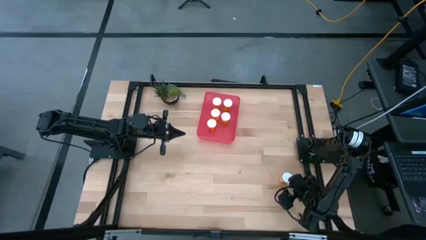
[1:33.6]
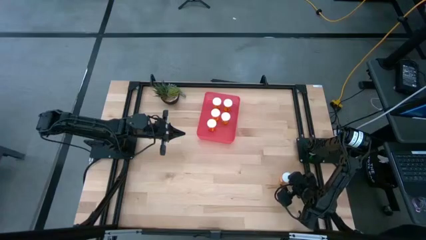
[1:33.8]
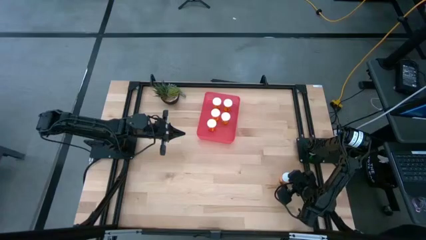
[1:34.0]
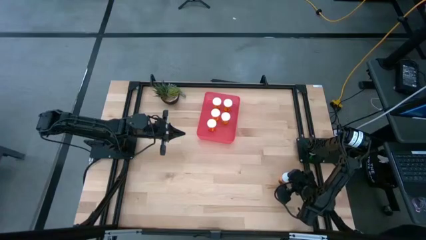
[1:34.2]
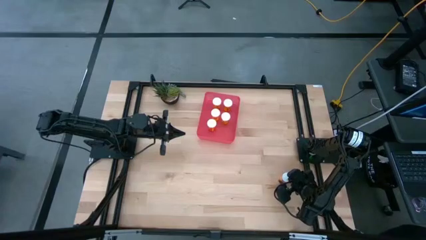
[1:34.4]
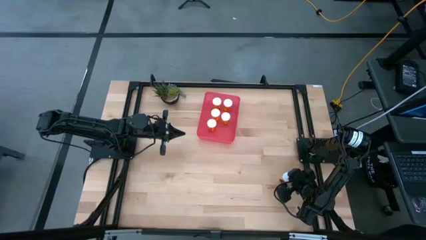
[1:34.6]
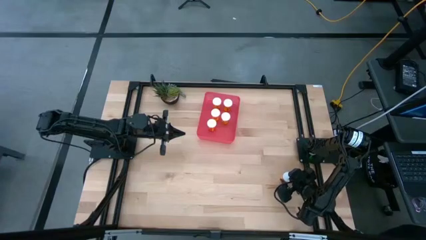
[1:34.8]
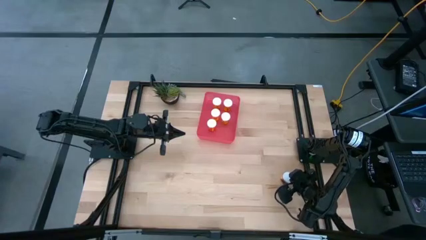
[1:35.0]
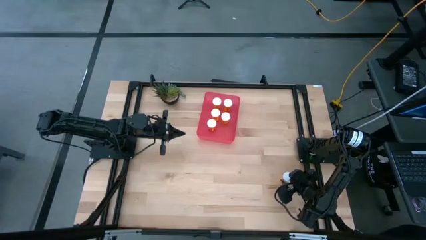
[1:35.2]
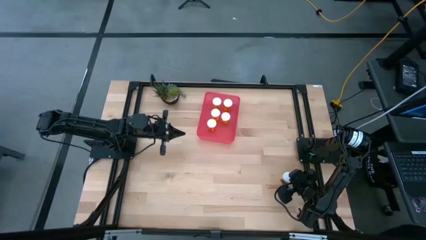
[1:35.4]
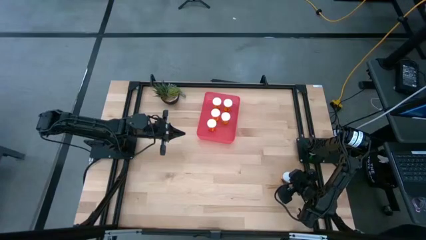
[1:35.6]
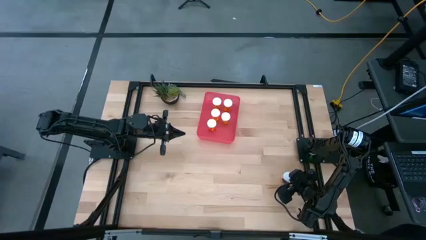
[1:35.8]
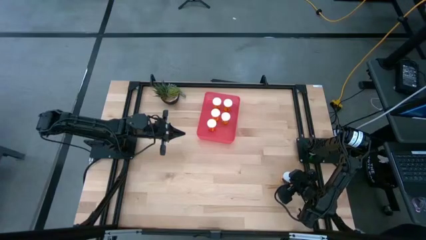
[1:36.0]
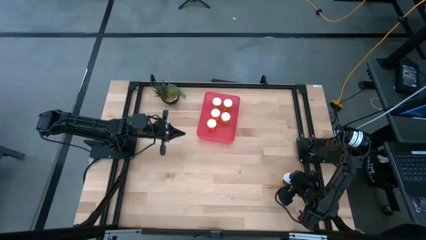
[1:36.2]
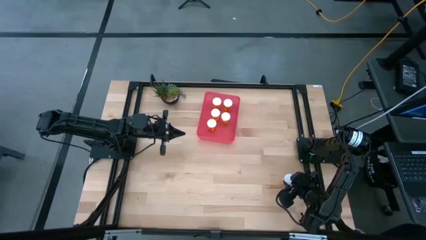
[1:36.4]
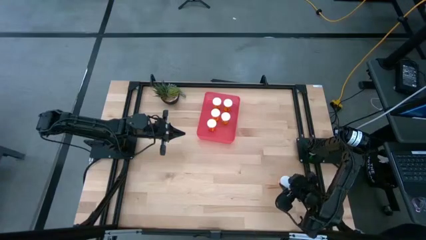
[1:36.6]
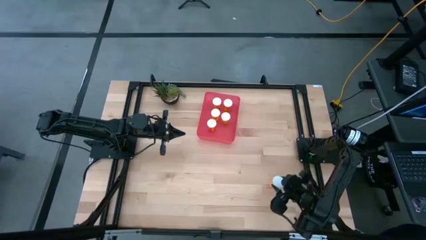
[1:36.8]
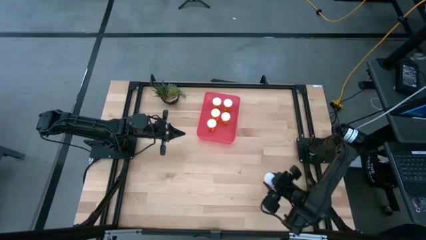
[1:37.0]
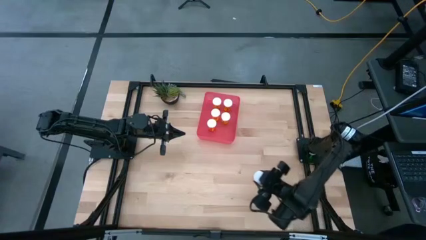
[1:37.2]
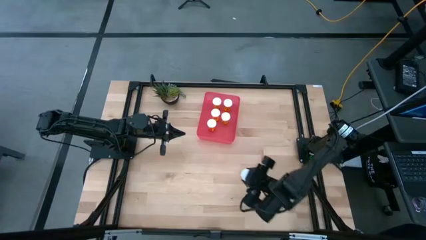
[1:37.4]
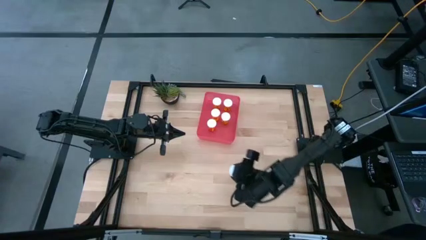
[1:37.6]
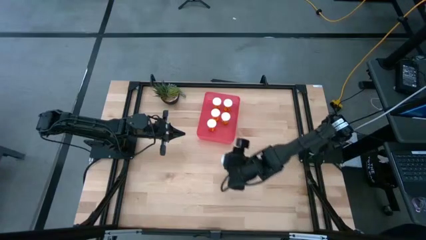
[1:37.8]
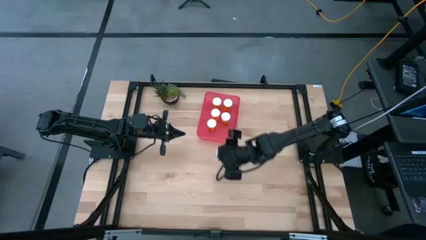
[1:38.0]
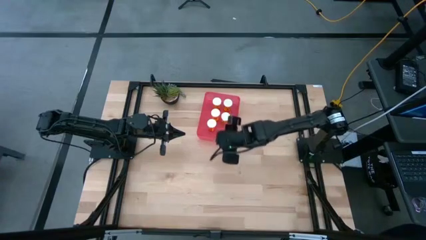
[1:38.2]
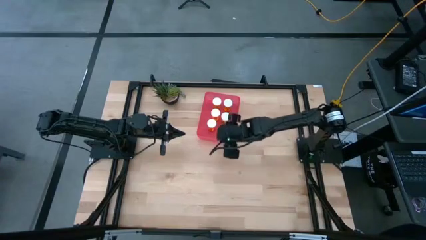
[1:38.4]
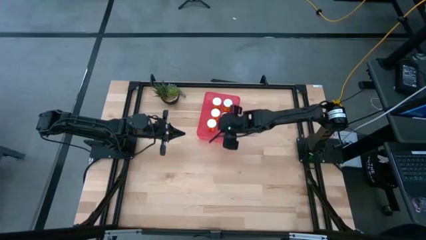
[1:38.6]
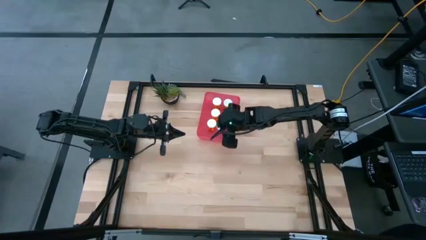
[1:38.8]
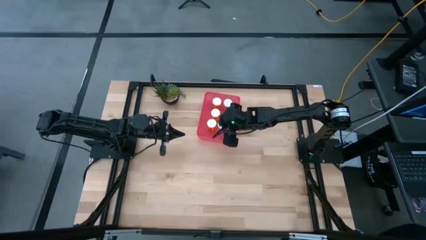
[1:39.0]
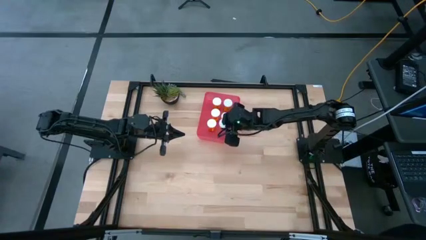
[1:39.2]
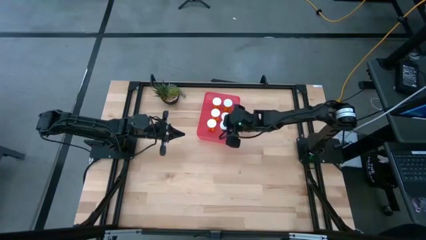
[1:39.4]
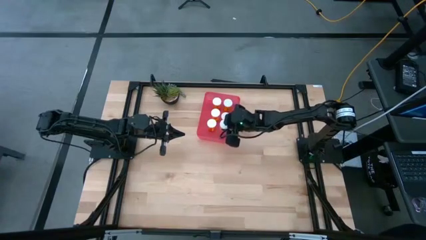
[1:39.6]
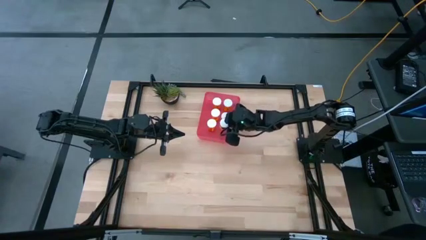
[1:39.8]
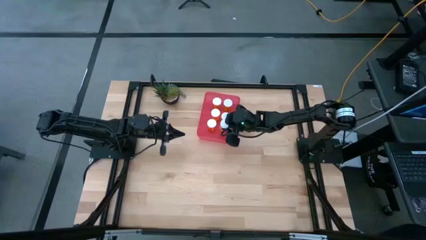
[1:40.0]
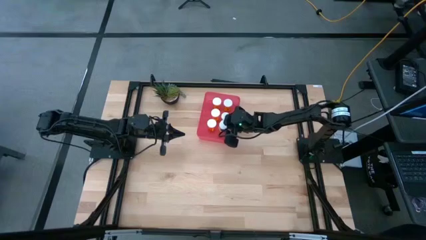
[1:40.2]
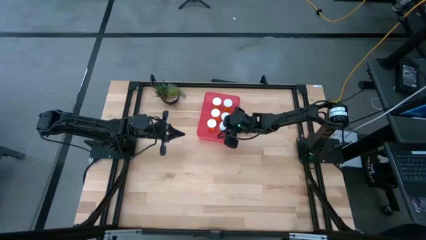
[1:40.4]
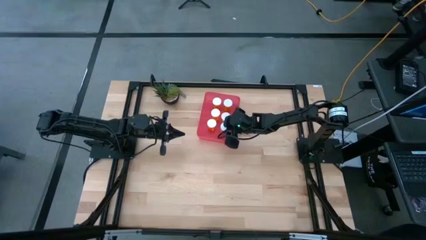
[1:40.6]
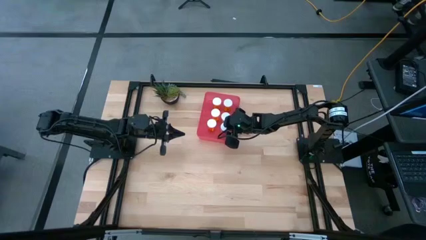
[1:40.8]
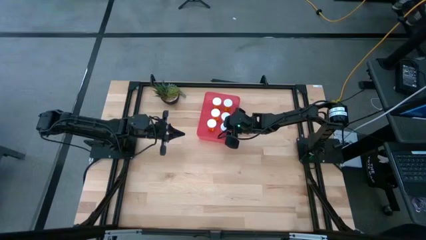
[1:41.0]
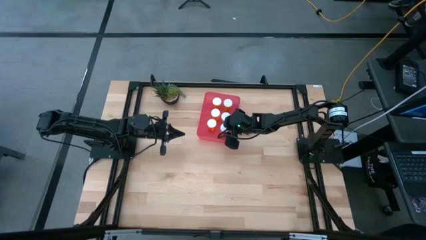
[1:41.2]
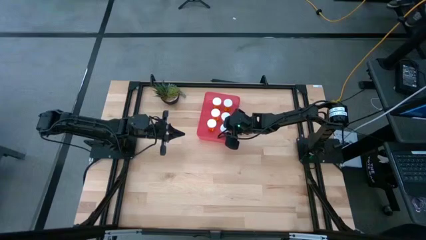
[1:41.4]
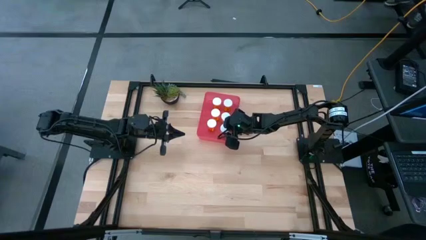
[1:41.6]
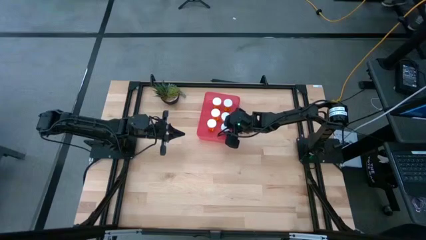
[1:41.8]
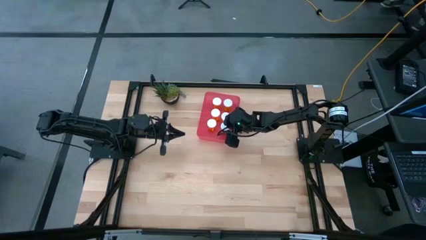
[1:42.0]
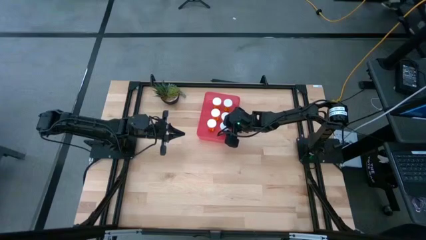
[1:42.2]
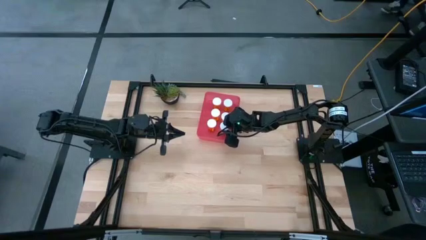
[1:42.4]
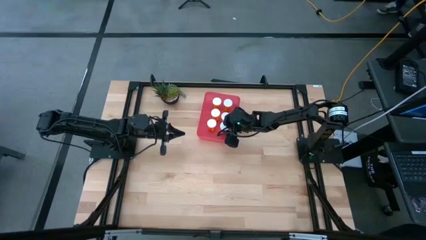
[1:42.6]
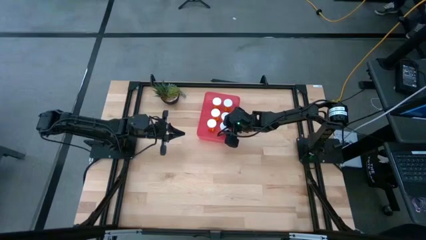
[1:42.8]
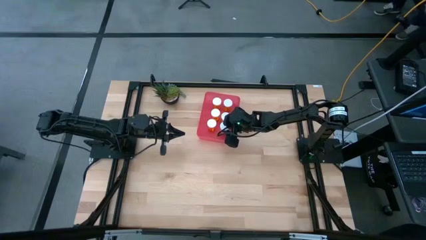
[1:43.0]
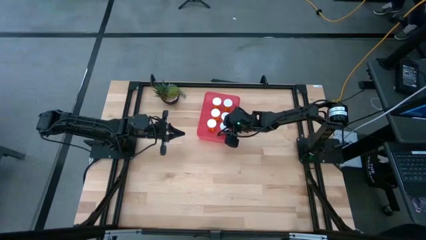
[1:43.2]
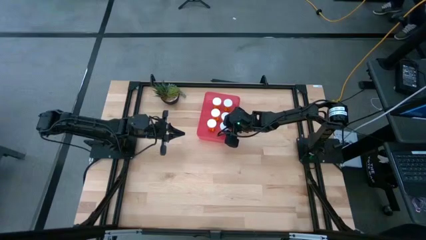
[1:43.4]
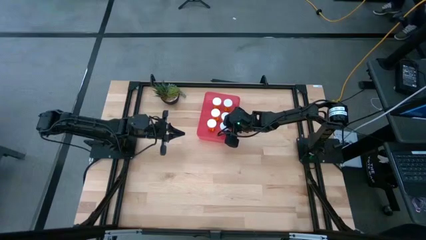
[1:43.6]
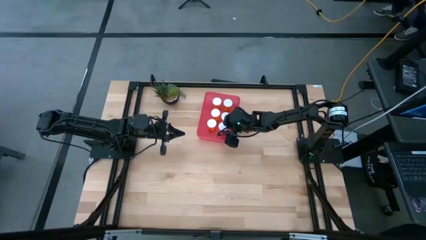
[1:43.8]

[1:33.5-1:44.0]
Task: Pick and place pill bottles into a basket
Put the orange pill bottle into the red bin

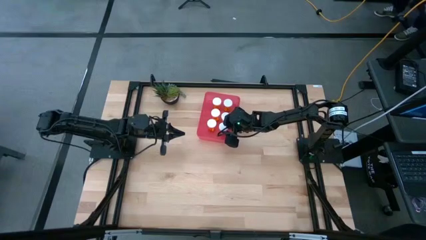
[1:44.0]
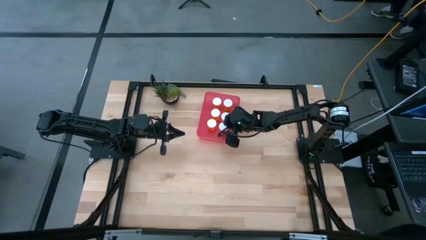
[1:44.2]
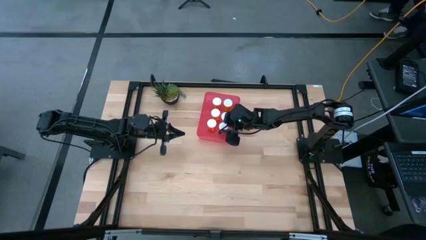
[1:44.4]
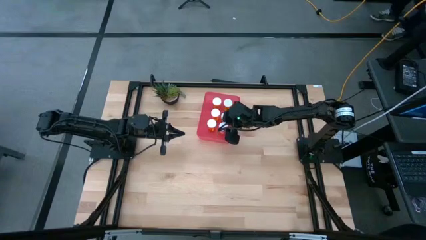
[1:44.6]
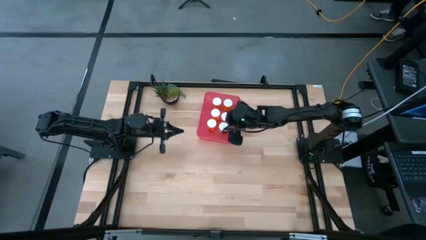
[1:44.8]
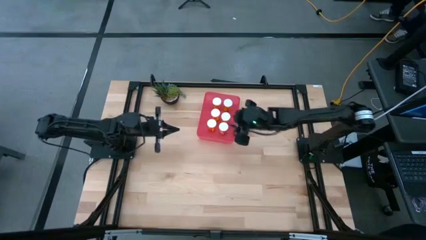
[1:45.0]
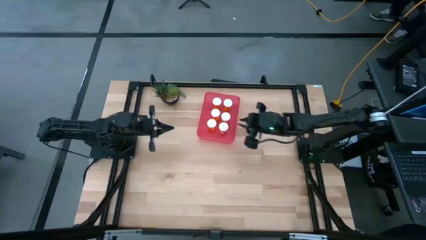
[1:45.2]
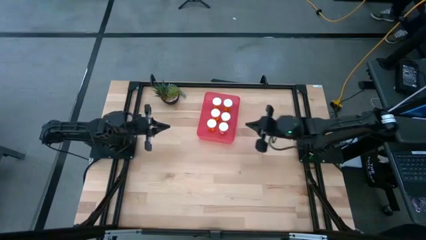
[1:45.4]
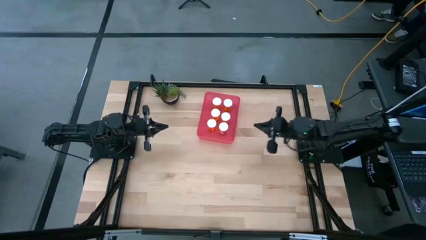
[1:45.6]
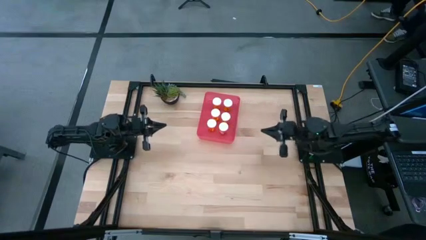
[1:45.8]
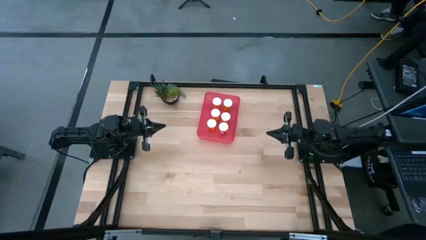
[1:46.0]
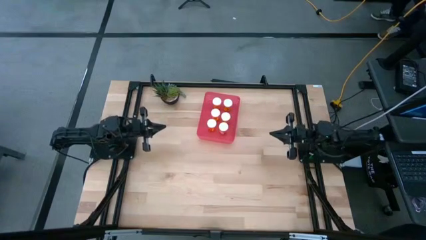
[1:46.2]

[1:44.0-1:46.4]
Return to Home Position

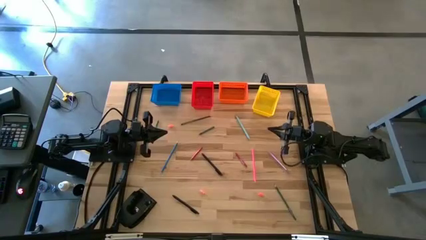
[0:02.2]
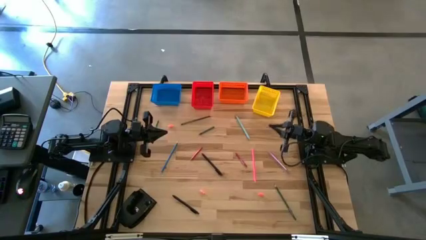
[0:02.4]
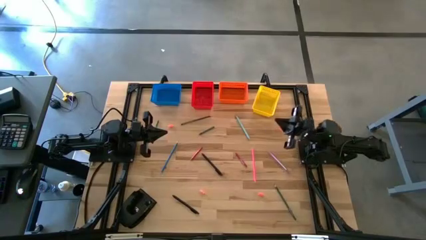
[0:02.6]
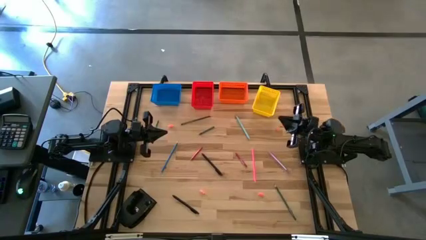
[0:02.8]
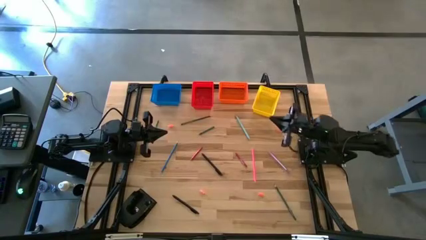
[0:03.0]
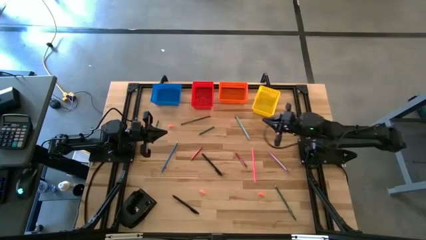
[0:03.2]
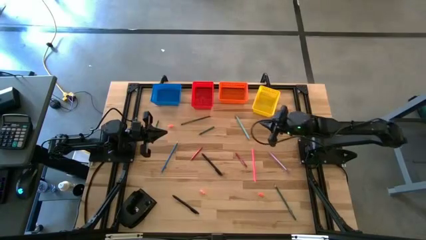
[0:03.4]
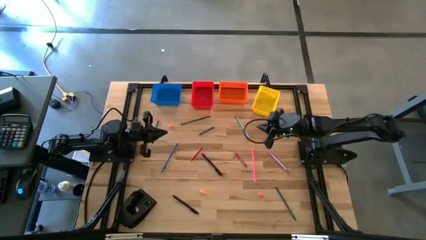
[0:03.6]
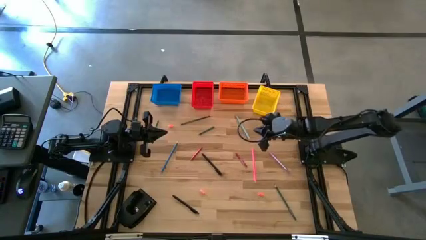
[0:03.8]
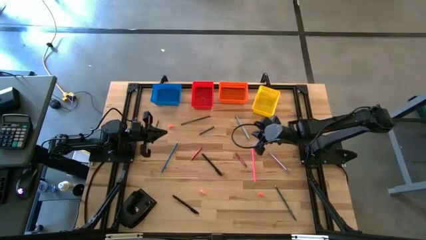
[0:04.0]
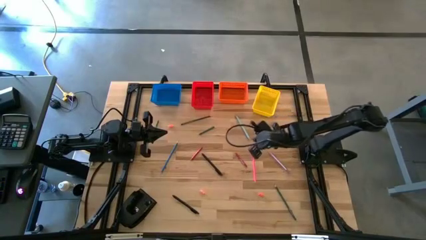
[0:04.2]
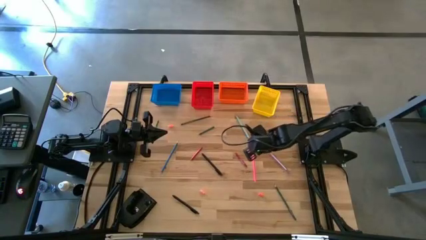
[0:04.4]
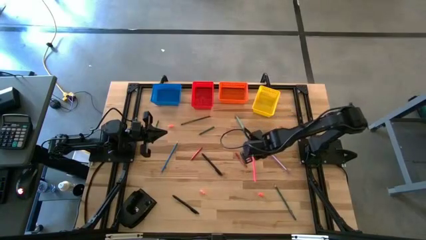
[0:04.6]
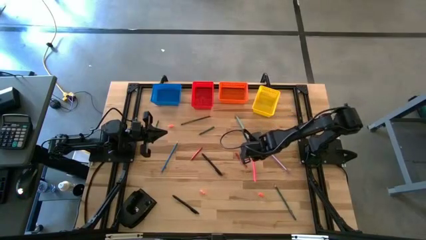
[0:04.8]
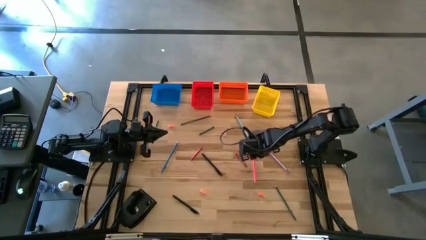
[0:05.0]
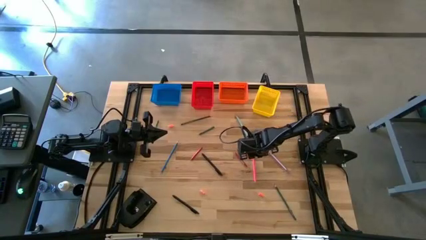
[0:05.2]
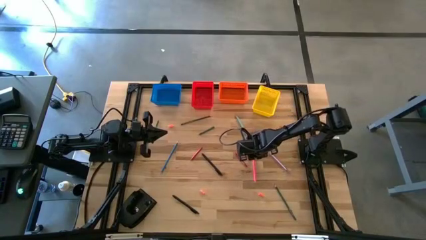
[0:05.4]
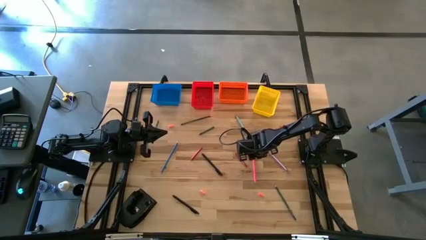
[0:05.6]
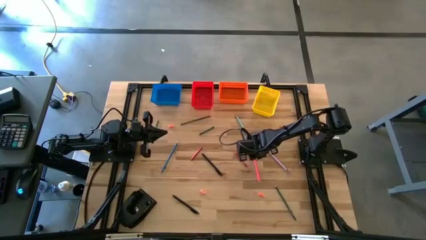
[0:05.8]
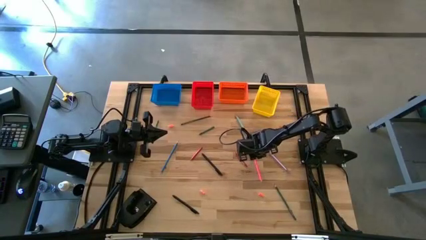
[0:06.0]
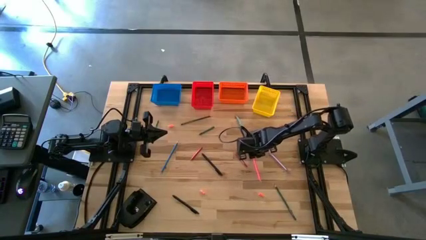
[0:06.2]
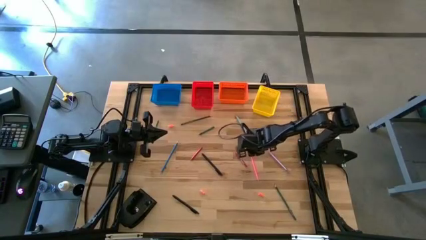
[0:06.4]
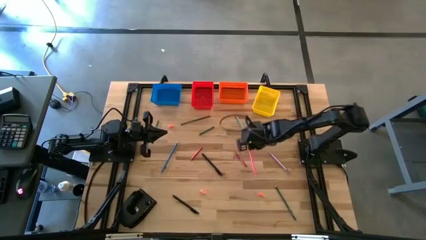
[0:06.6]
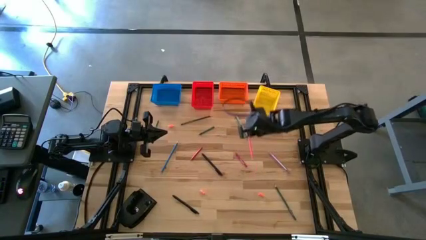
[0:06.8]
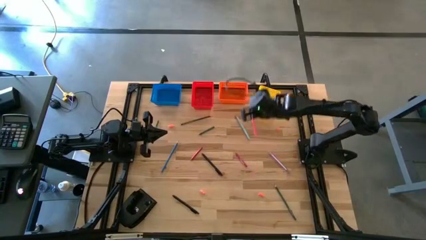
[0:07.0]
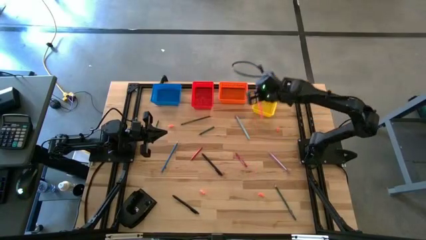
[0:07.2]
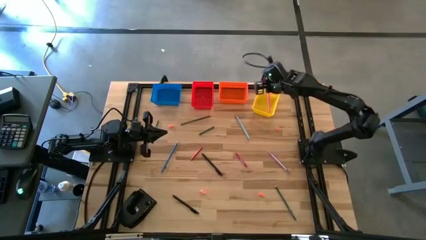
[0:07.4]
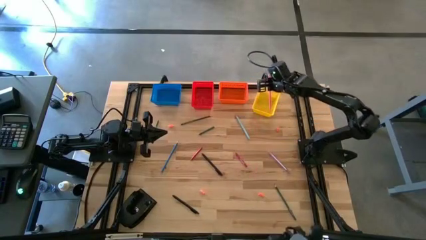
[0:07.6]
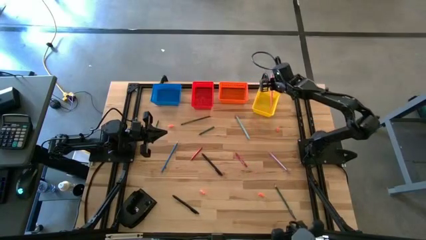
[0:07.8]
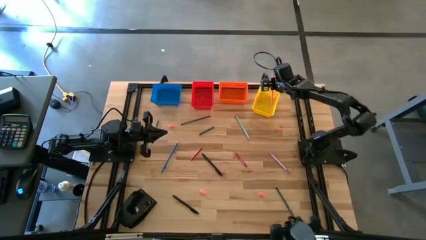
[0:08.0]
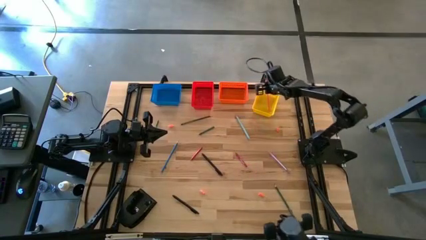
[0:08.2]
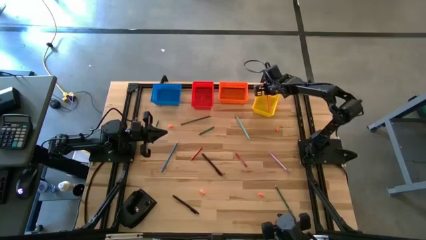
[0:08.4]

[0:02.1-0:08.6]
Task: Sort crayons/erasers/pens/pencils in bins
Put the pink colored pencil into the yellow bin
